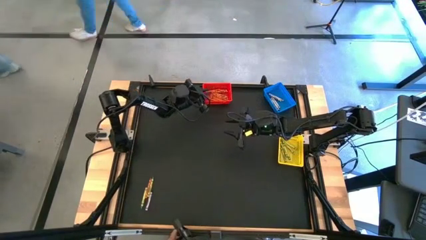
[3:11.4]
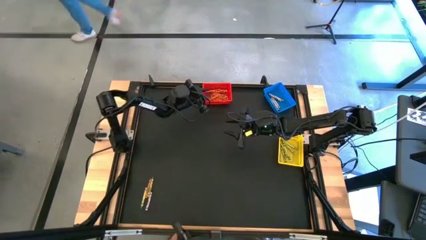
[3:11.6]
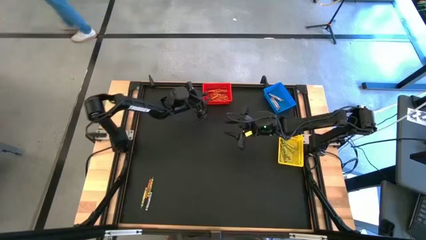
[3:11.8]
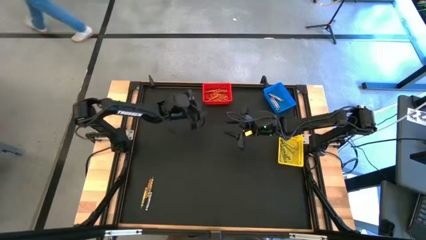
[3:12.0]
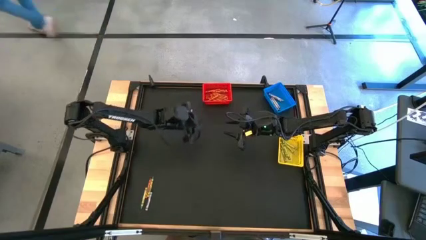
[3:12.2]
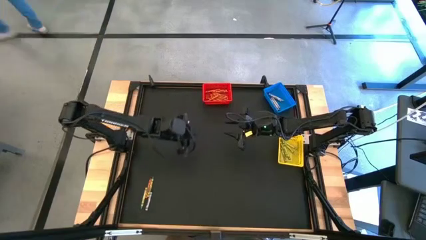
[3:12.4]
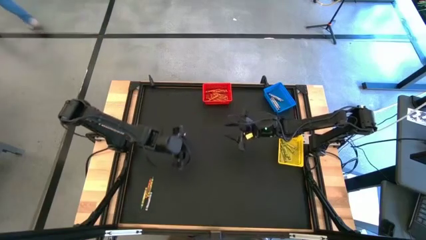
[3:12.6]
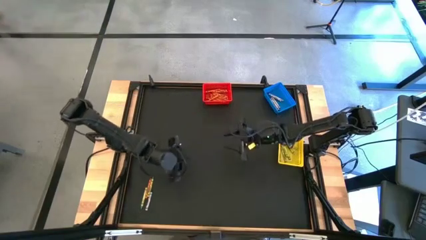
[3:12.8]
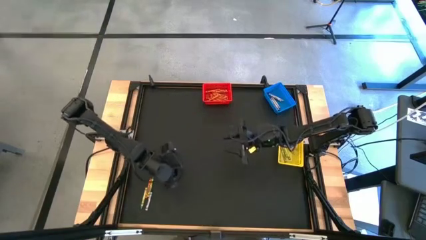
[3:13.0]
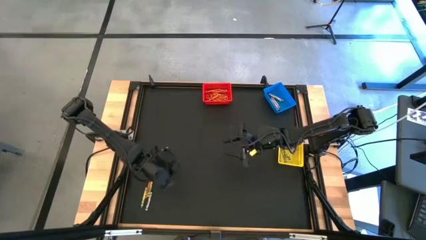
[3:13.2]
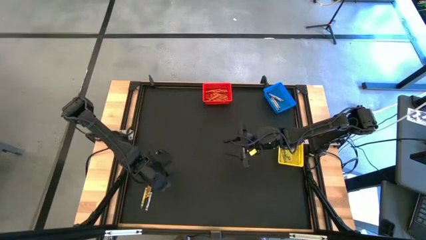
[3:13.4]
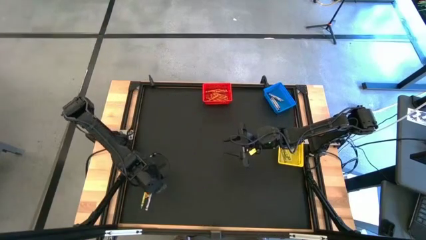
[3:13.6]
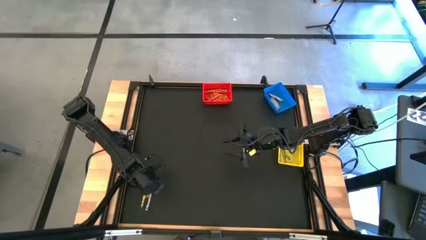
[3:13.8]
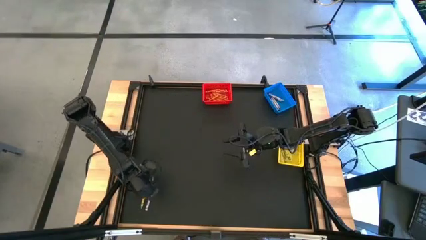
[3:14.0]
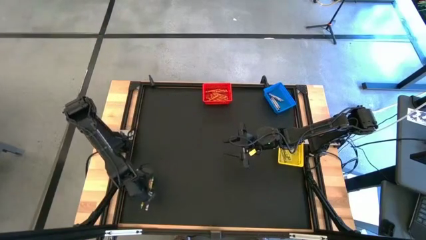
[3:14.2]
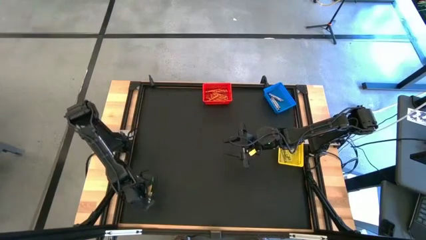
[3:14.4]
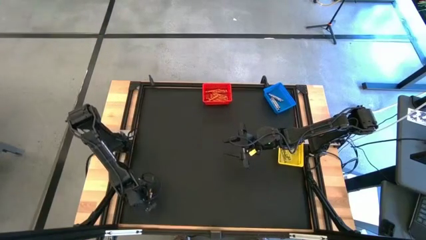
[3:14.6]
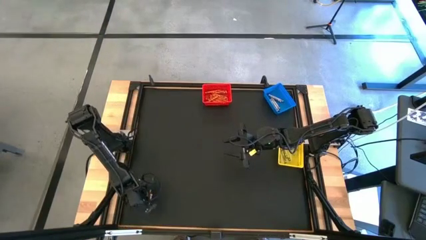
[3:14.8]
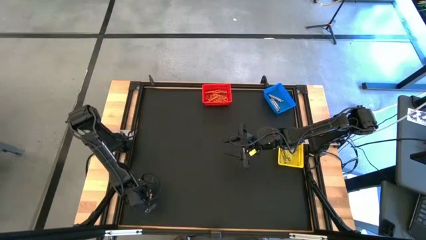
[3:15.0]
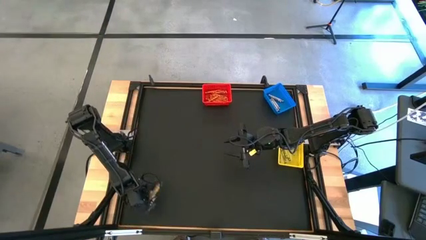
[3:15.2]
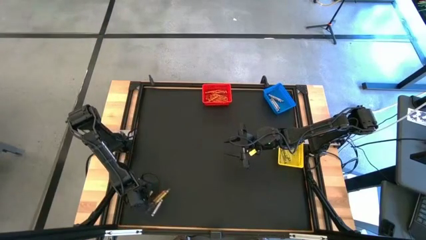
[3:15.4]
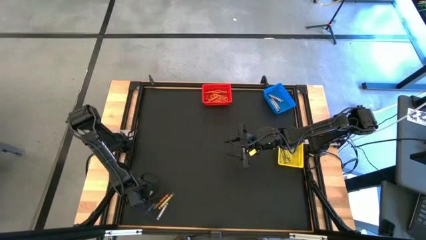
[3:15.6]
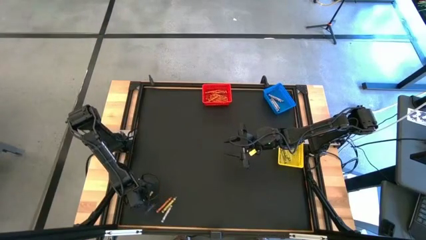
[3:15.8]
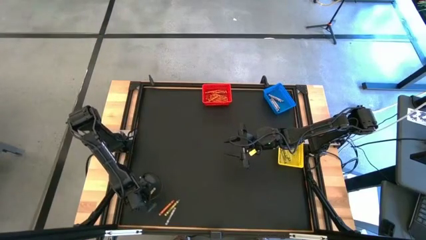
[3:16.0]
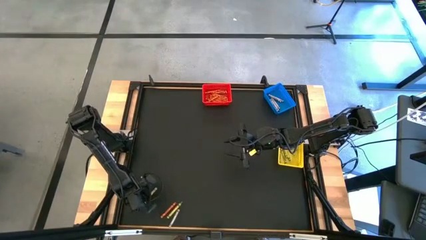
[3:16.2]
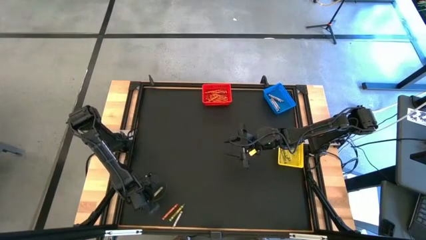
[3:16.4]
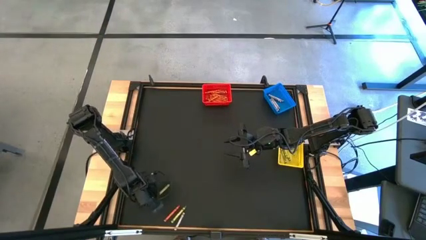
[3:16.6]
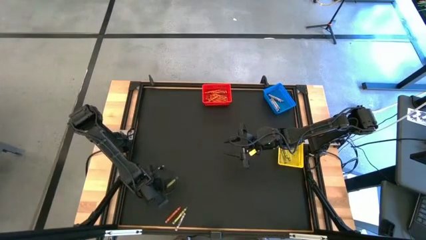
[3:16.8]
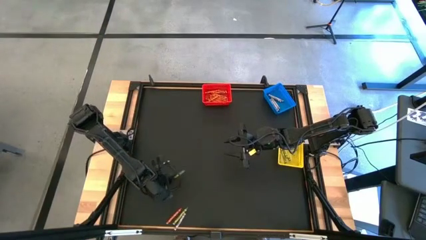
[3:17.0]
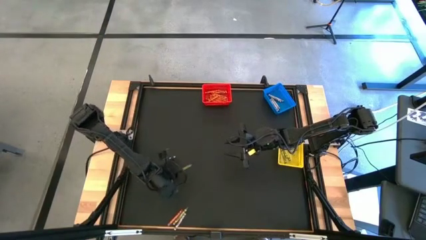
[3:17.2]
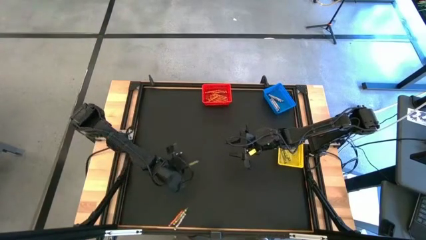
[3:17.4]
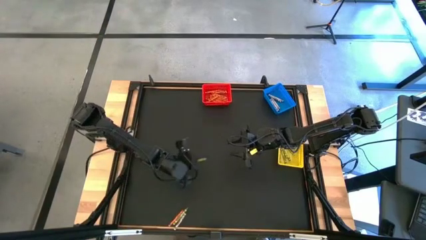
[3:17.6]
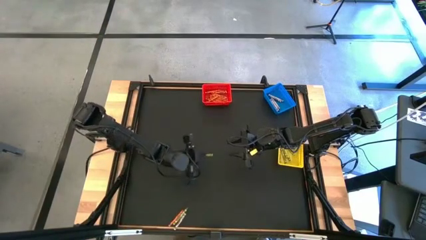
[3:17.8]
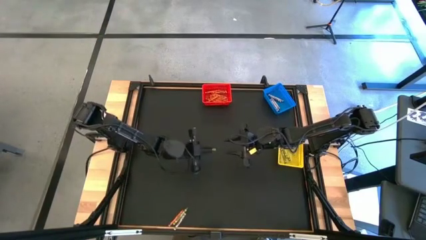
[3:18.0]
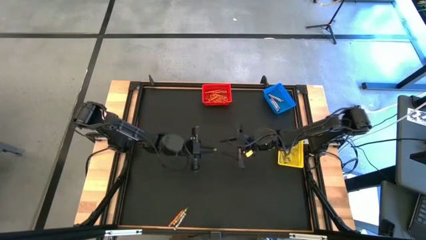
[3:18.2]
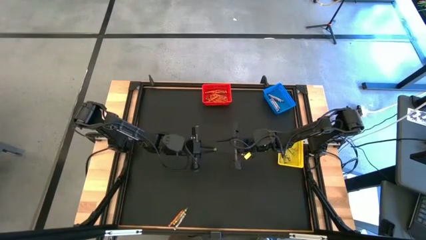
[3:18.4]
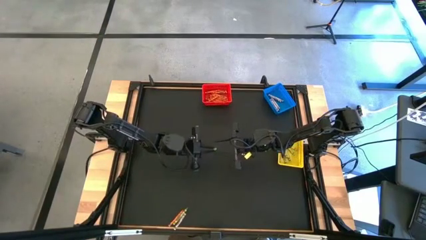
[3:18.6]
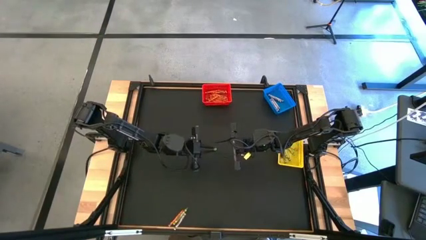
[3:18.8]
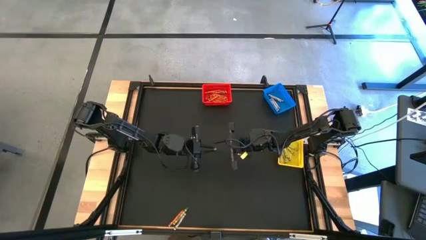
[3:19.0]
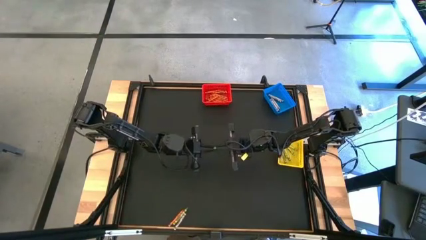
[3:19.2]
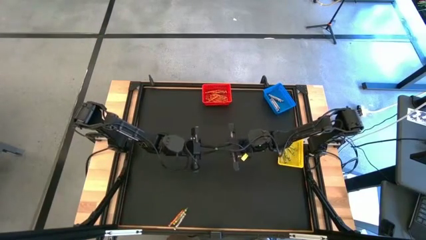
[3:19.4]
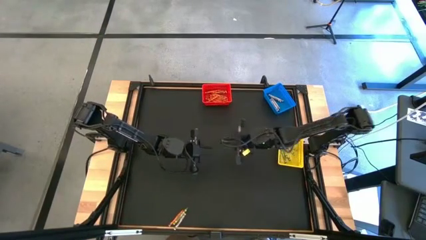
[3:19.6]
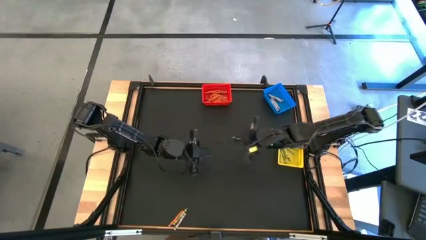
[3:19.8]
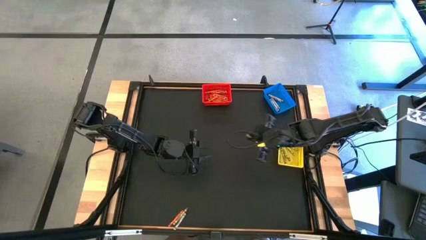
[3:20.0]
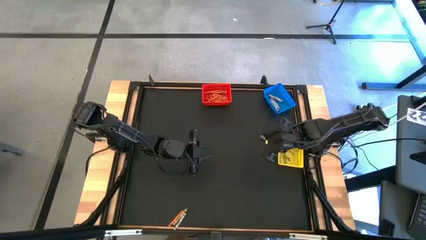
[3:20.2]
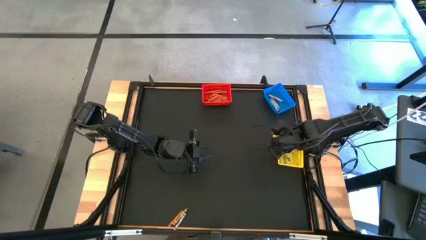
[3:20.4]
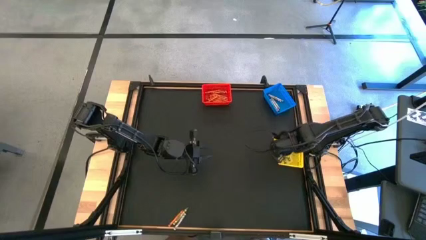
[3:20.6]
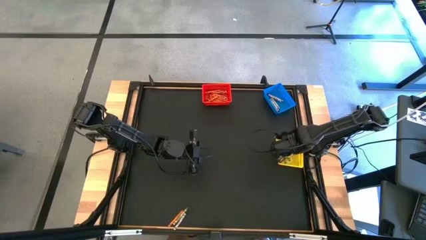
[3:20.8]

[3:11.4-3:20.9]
Task: Sort crayons
Put the green crayon into the yellow bin

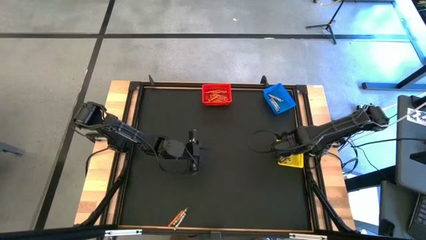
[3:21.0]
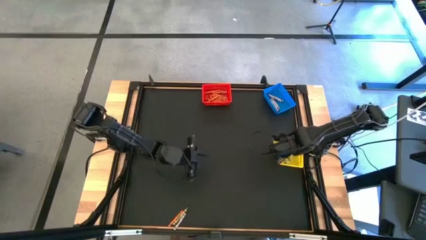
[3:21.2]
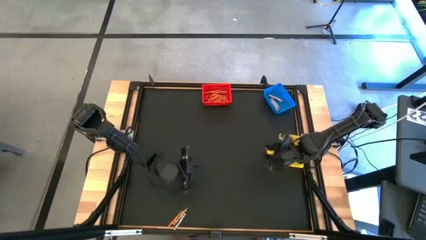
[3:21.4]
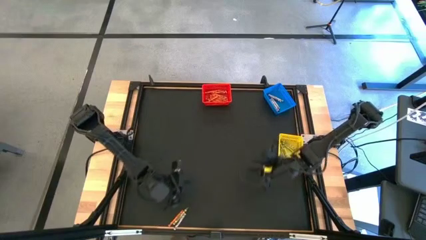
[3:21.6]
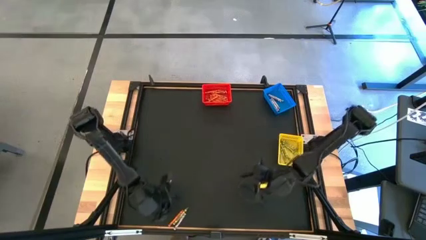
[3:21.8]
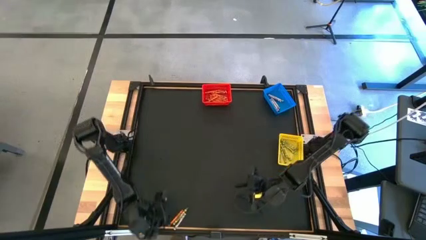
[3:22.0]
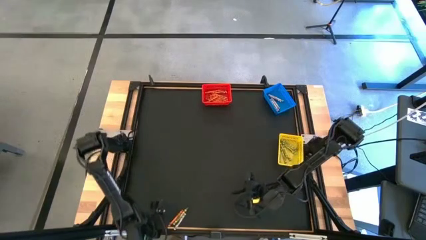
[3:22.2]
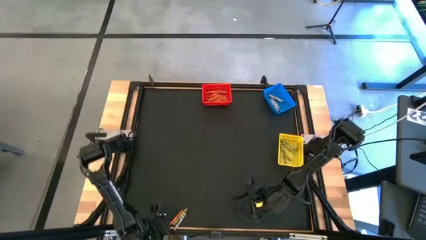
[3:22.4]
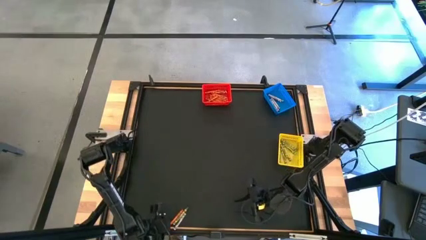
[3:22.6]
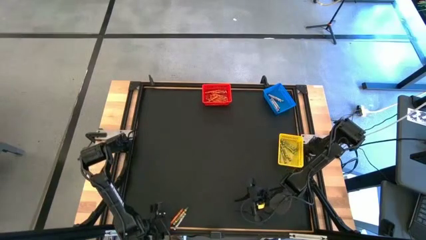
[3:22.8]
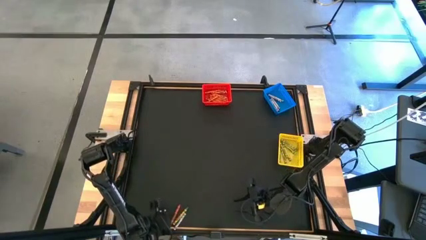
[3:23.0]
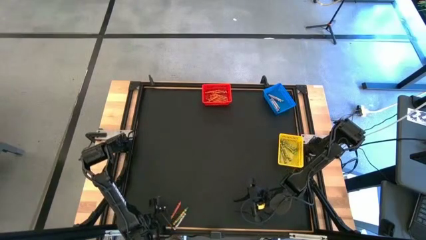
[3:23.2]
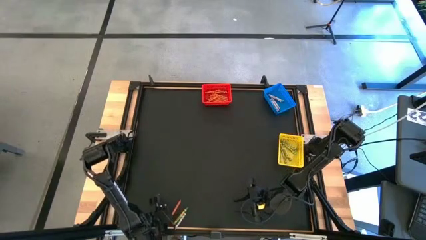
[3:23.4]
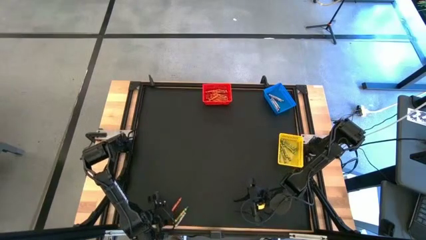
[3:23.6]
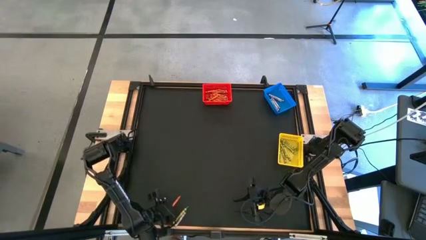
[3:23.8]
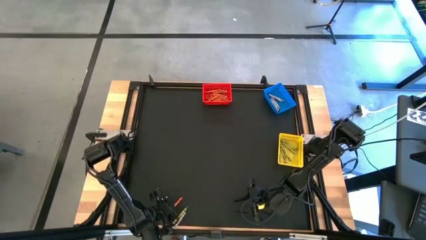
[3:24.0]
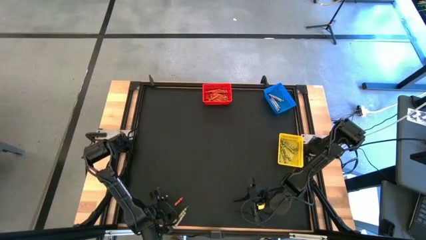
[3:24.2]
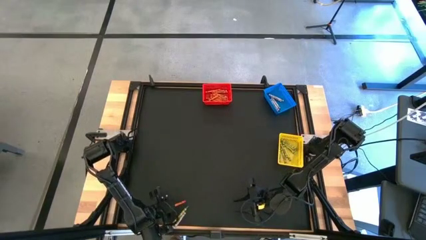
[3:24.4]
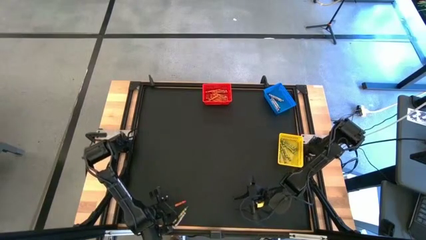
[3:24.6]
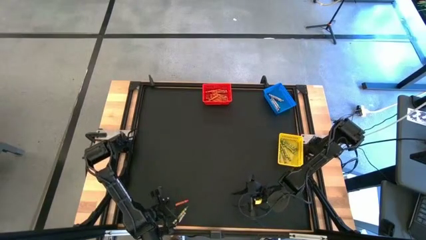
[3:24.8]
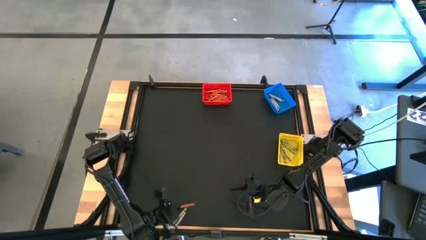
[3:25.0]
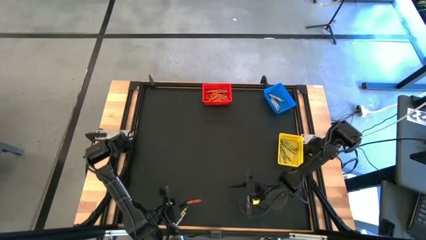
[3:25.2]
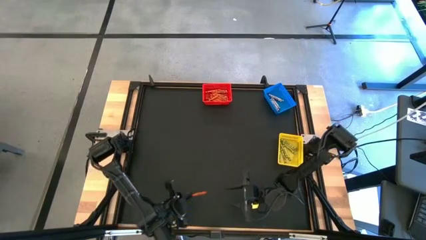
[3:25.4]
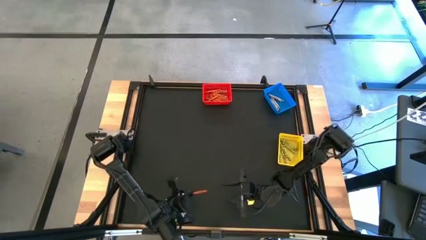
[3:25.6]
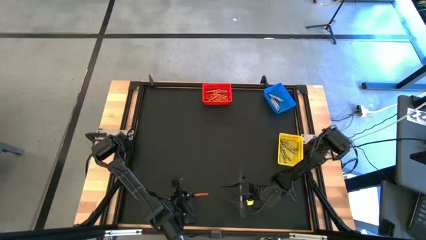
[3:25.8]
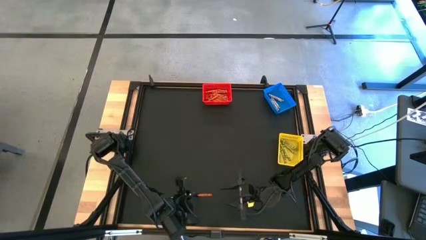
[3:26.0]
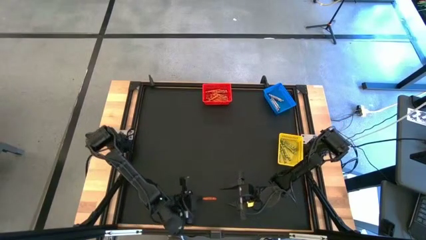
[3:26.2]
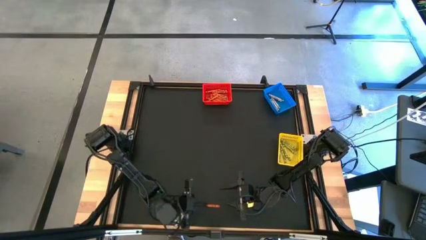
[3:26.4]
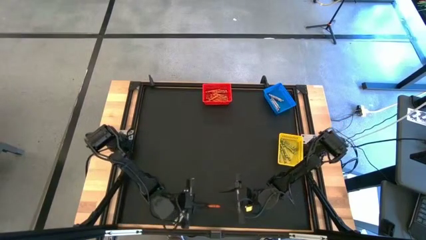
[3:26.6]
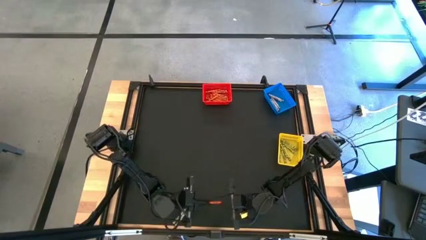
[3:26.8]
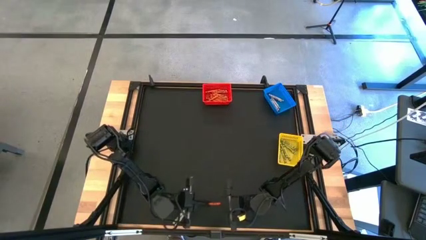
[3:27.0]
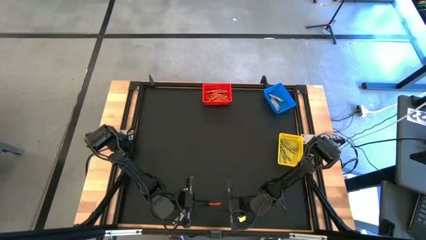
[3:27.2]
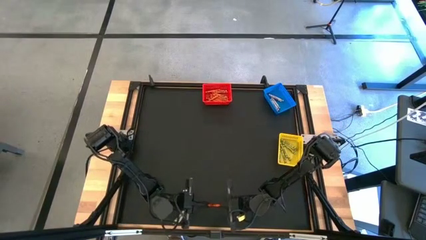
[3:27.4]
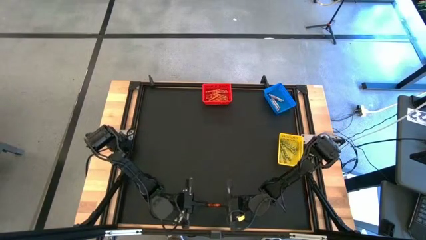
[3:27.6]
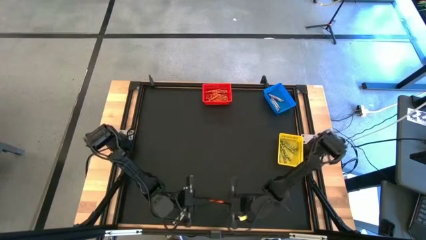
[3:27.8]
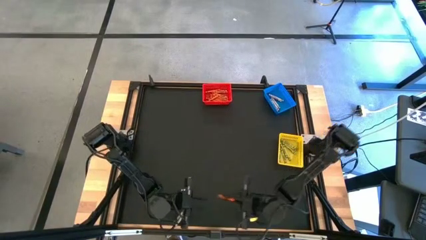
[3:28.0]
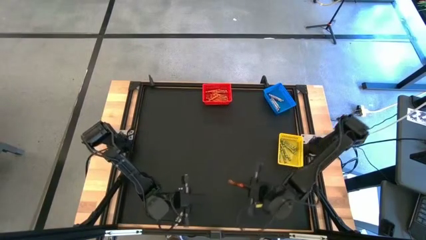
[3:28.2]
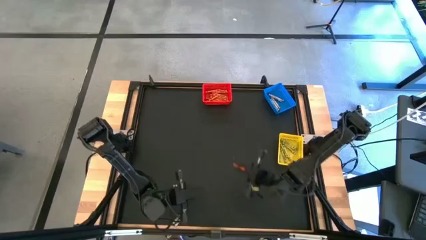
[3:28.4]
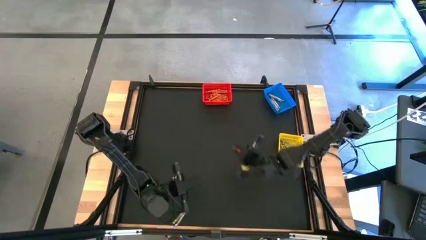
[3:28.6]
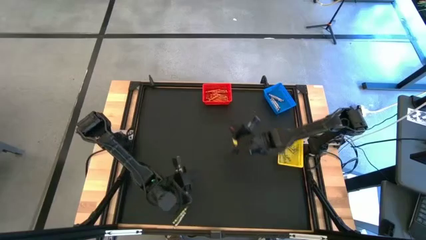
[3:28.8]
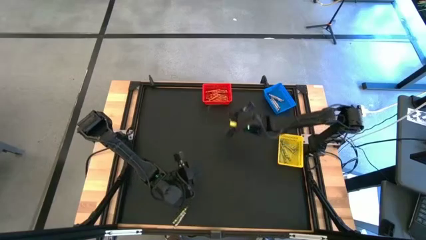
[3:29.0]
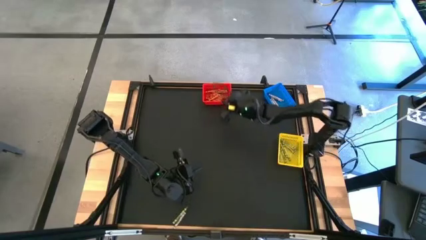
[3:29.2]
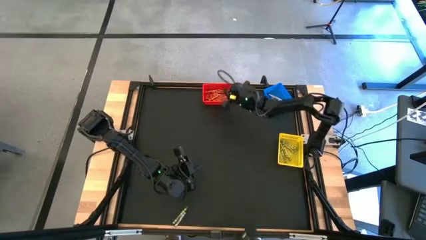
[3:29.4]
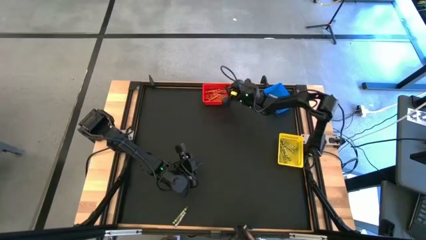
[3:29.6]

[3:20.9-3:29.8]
Put the orange crayon into the red bin
